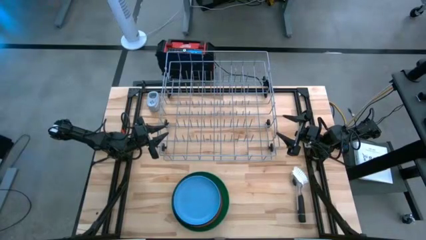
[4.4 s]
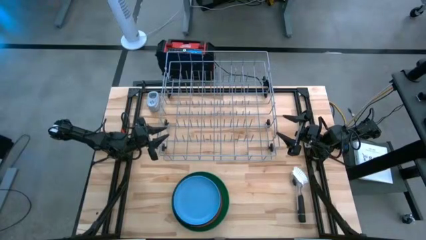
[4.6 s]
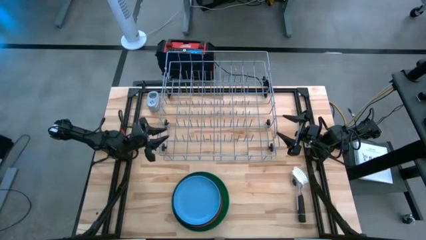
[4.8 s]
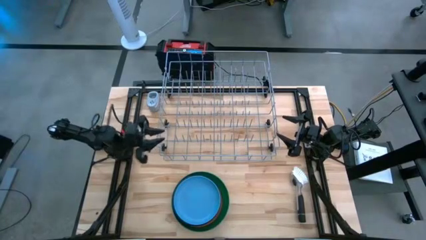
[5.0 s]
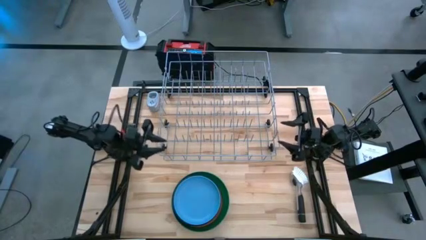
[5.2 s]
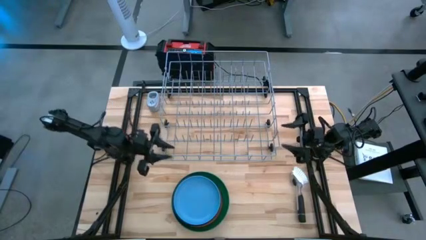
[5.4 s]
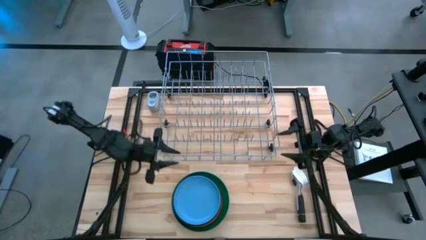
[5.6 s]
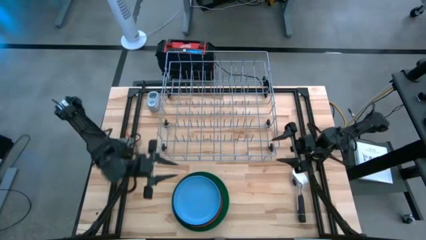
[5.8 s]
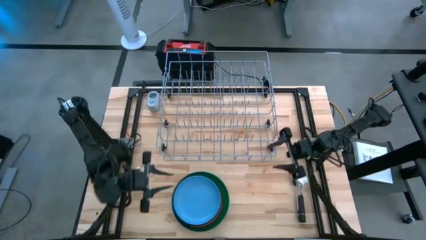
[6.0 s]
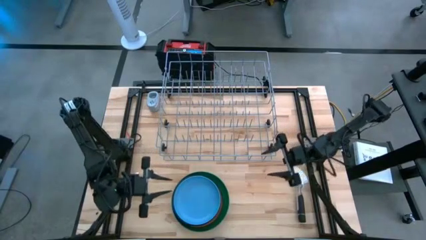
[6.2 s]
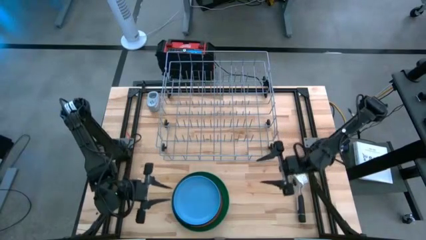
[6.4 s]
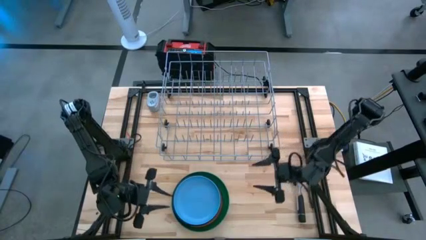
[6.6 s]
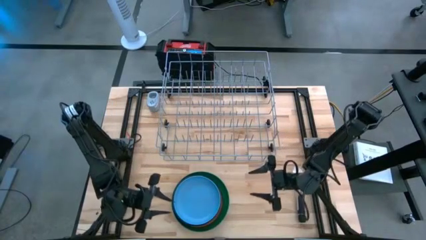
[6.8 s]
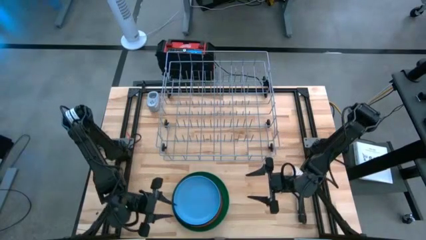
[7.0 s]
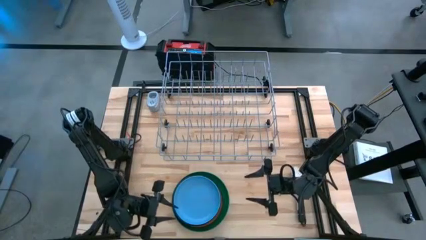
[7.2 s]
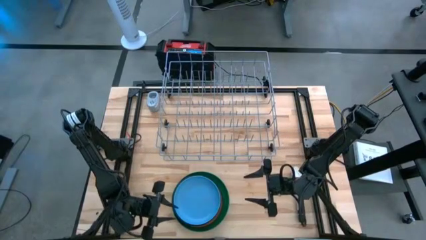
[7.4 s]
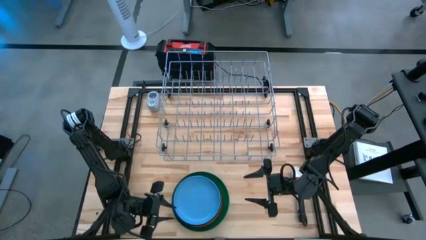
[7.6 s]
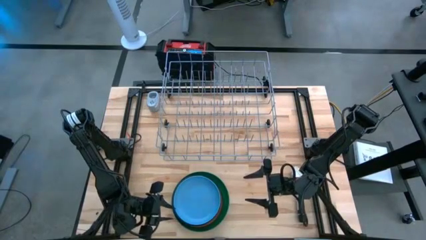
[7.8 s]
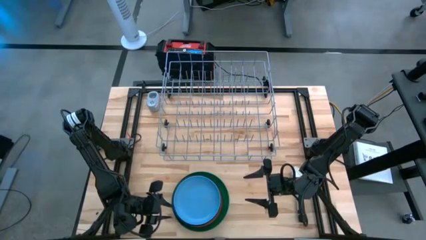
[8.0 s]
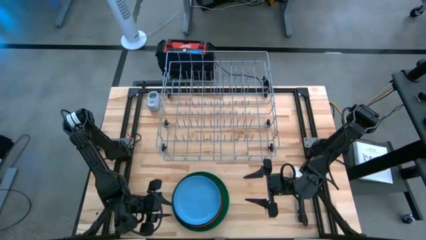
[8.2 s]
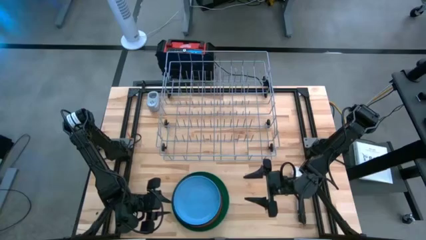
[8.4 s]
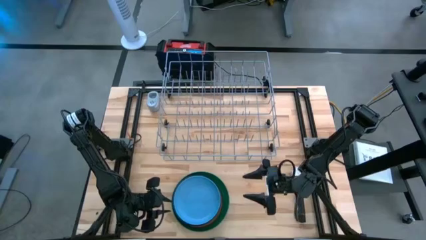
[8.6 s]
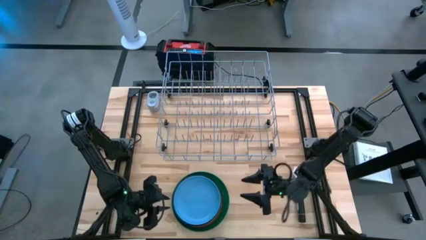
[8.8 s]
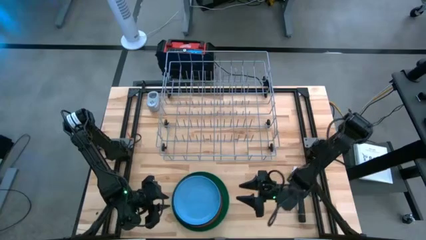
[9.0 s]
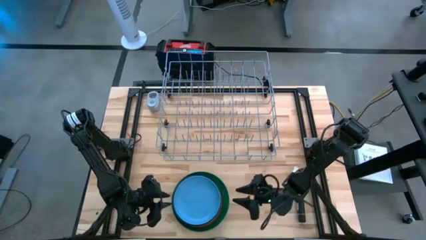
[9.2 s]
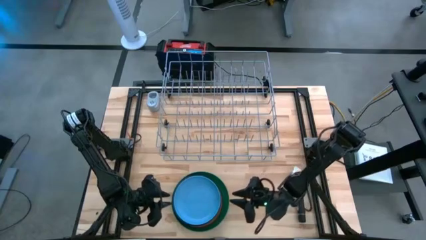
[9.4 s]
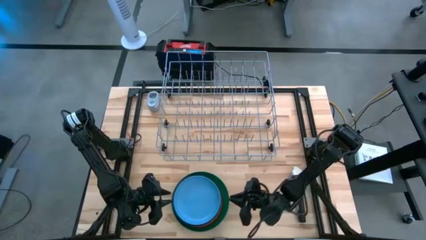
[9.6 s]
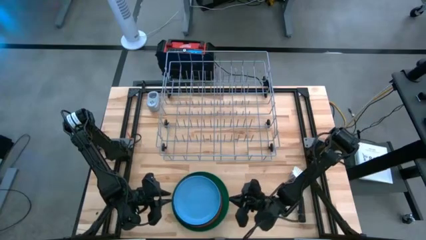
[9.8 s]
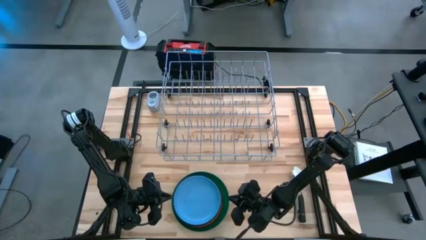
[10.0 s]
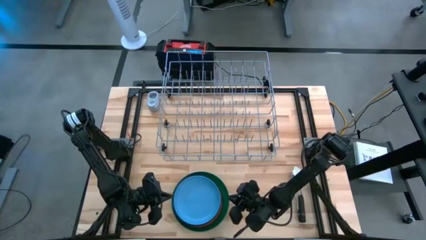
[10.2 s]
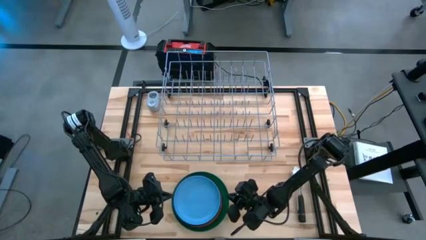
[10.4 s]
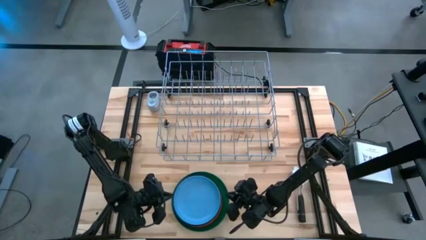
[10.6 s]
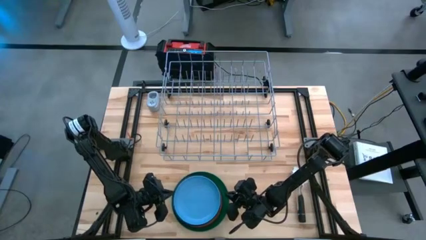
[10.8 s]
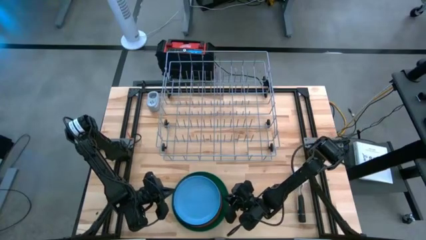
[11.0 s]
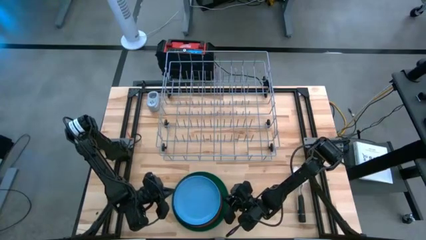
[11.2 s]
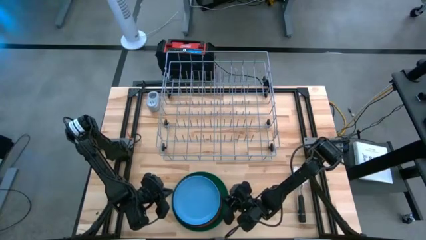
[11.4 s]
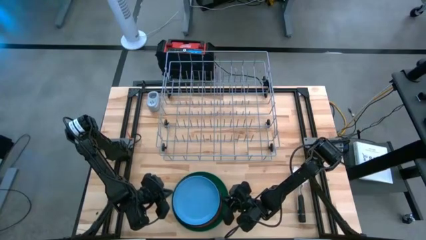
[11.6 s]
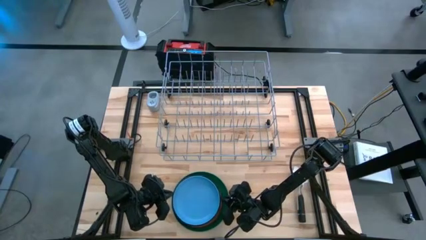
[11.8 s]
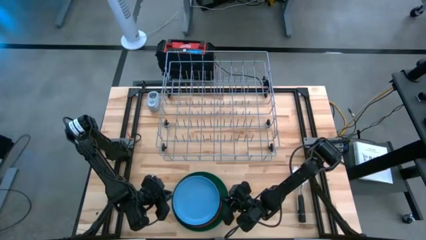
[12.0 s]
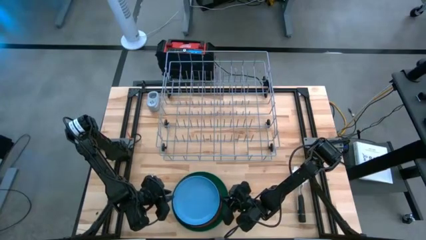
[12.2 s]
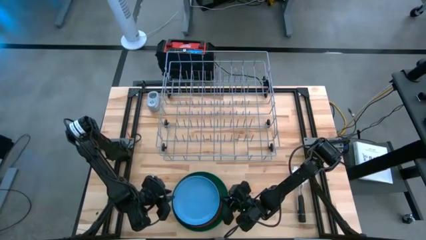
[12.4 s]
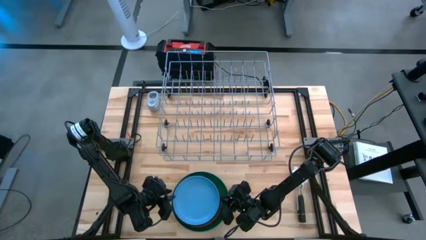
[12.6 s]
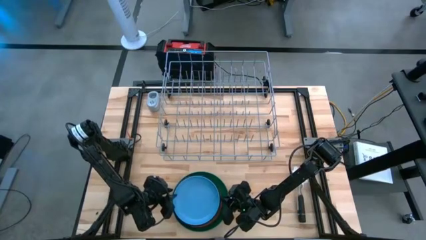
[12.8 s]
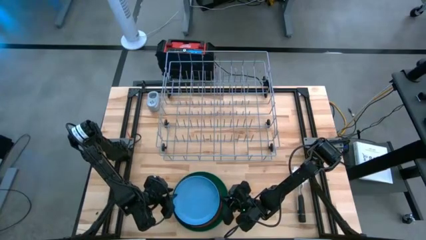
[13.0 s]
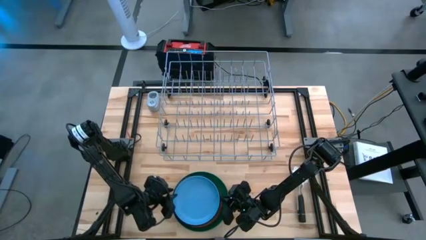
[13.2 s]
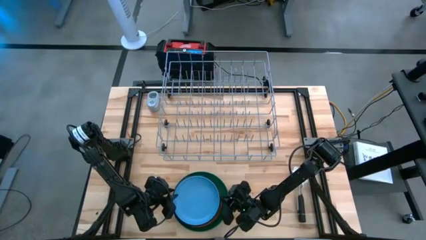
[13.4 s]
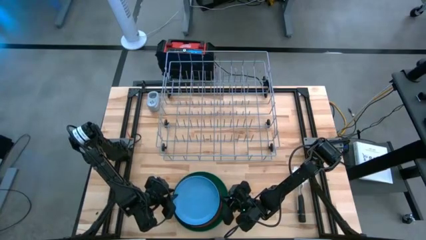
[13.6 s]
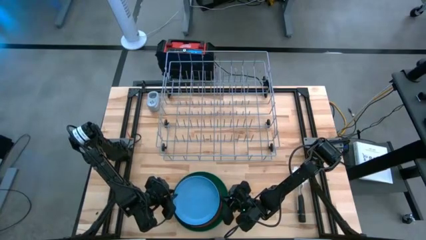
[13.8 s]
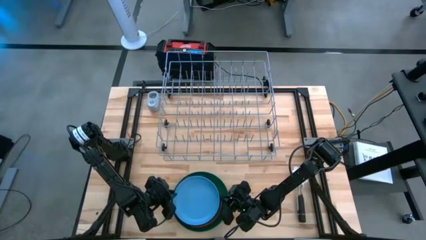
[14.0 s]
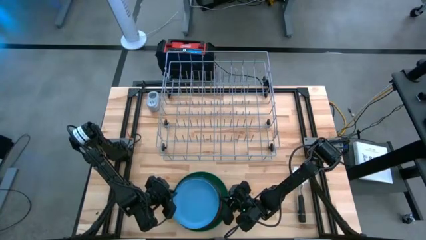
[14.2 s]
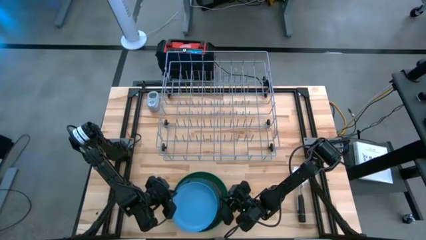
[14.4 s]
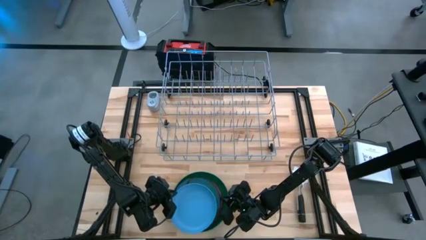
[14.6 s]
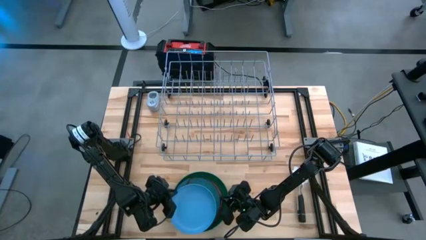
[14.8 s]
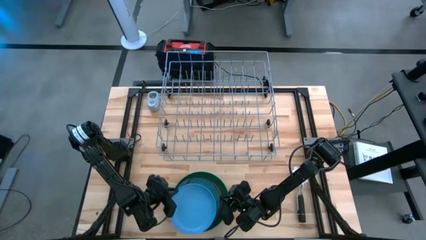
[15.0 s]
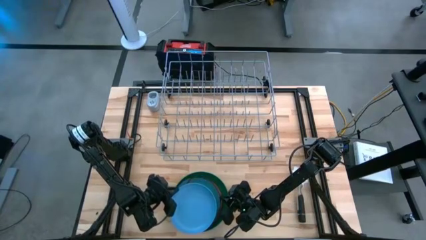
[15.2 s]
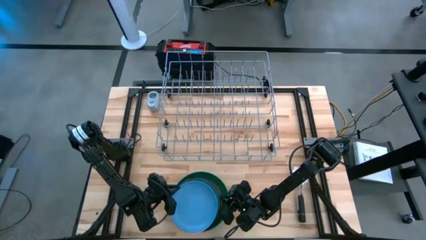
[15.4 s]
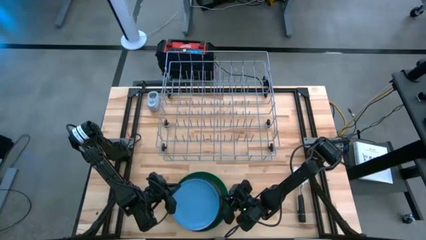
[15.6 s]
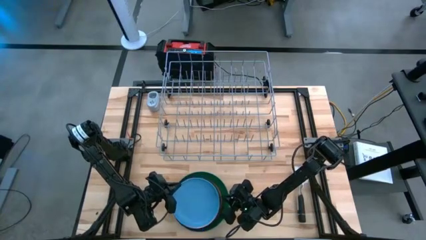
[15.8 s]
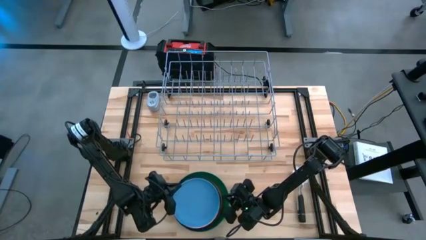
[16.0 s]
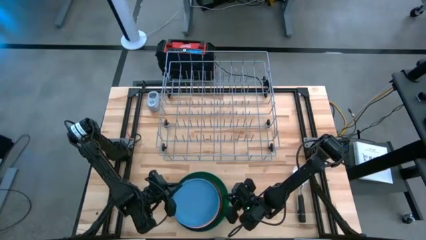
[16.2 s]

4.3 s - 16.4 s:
Task: Sort dishes
Put the blue plate into the dish rack

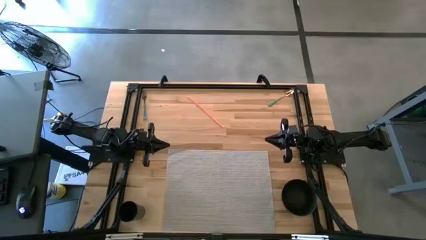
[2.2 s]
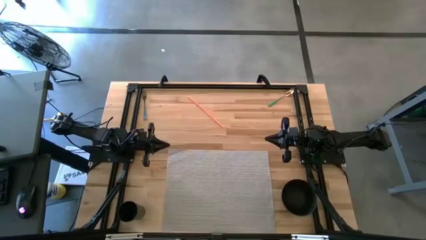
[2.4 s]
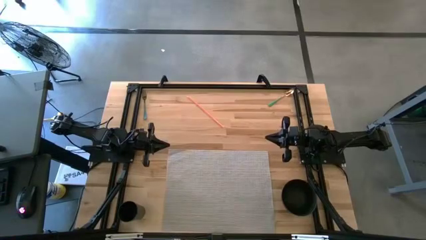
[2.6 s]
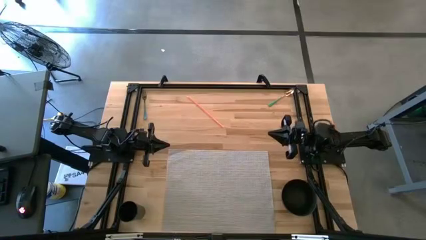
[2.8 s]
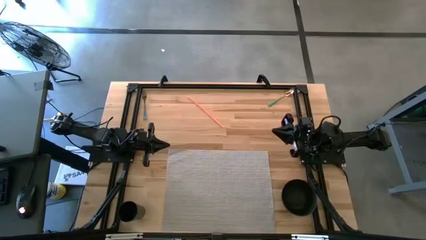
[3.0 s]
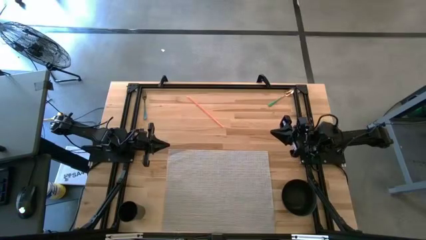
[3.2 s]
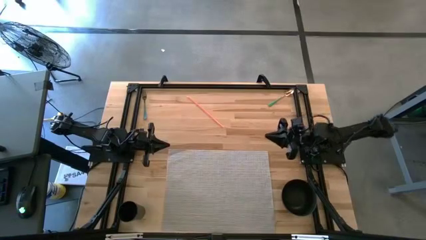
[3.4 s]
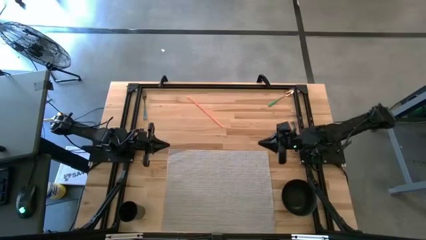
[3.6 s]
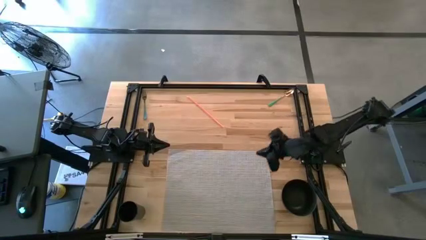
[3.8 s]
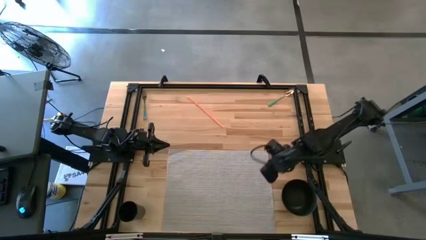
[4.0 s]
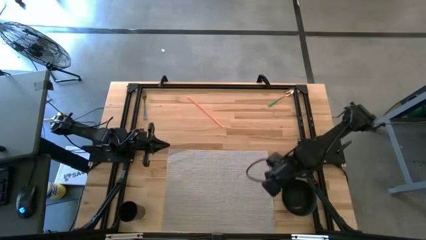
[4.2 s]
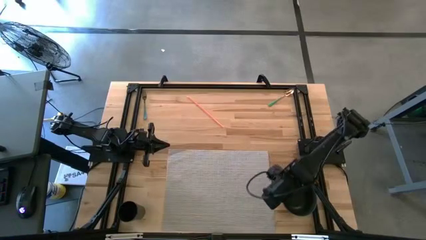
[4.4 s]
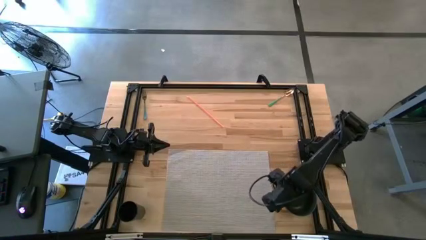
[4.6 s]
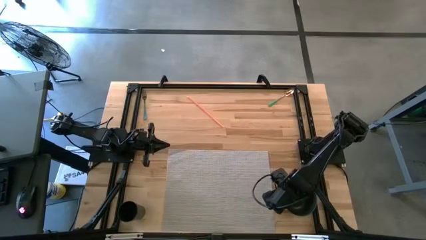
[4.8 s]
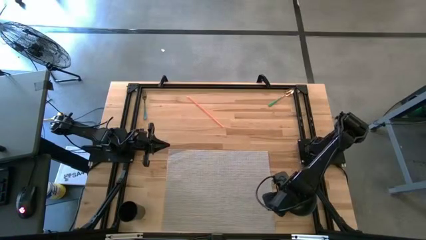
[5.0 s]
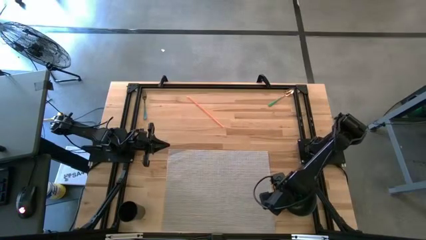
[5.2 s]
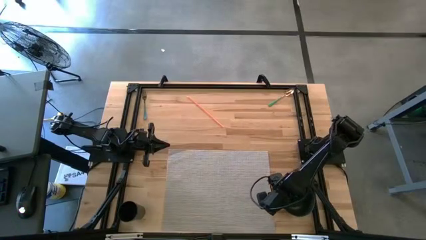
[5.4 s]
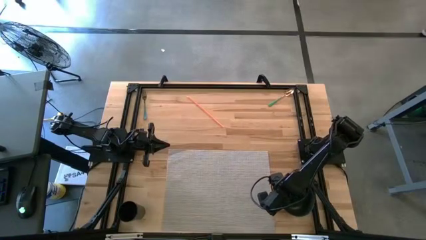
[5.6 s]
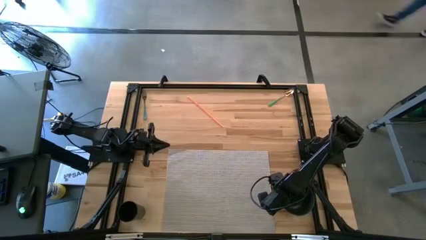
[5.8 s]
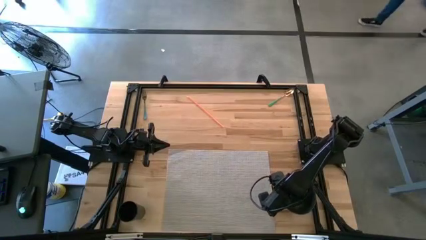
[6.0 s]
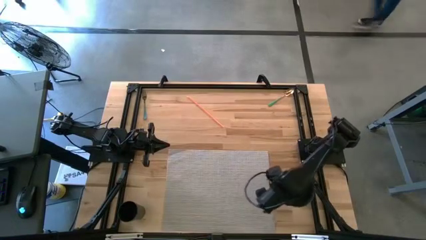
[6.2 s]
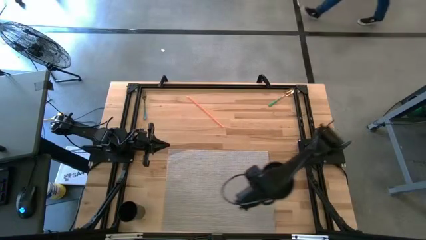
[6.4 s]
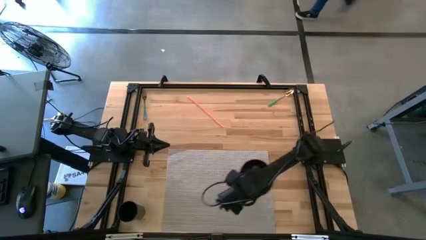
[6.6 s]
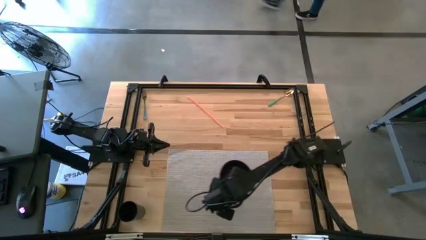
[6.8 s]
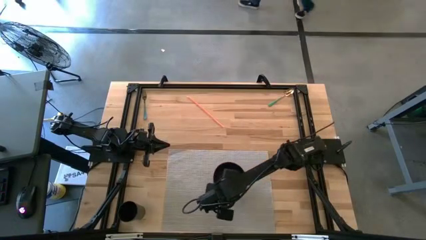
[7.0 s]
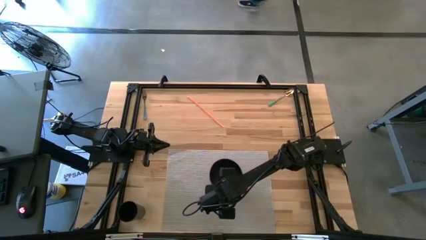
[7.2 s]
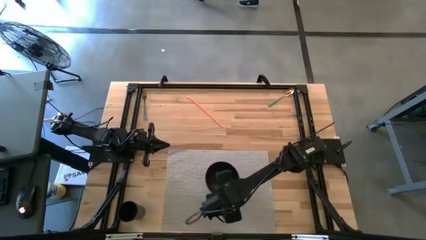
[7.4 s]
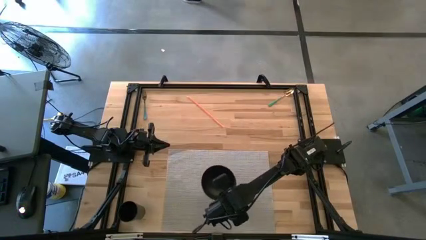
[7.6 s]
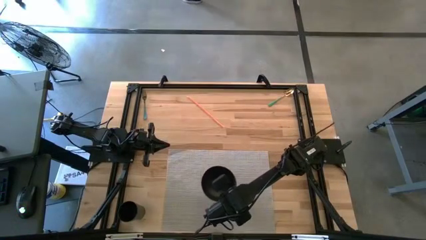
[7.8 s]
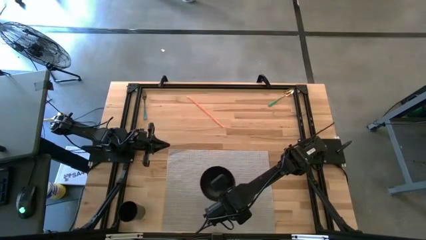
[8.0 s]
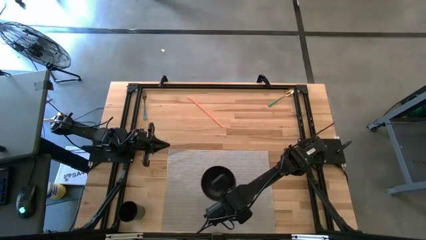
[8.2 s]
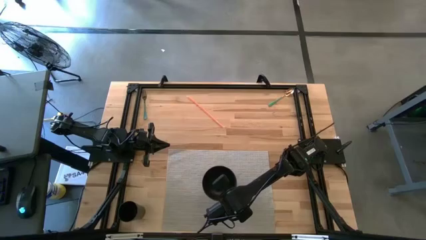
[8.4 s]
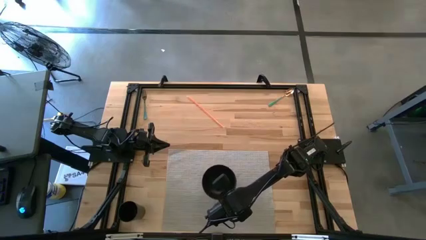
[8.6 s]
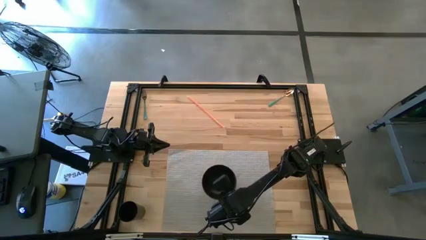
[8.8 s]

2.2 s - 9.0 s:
Task: Pick & Place Utensil
Put the black bowl on the table mat
